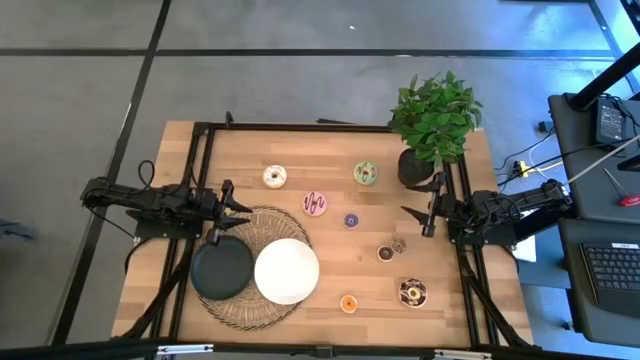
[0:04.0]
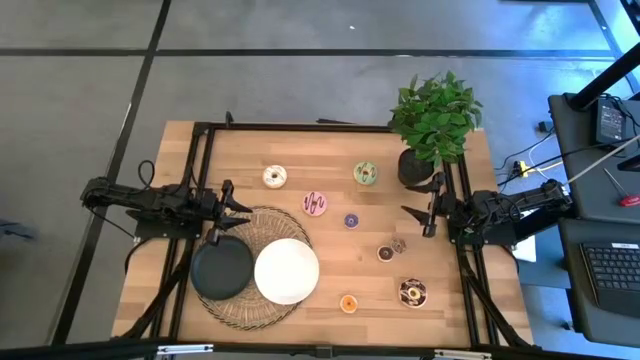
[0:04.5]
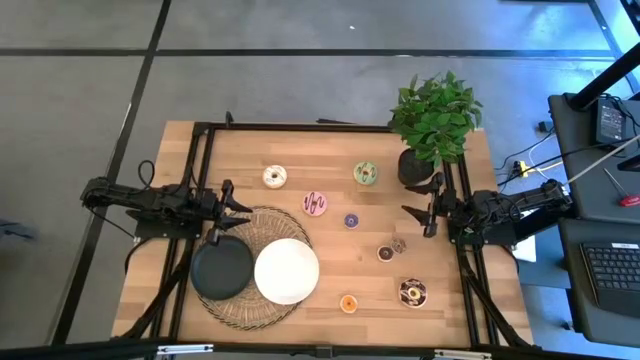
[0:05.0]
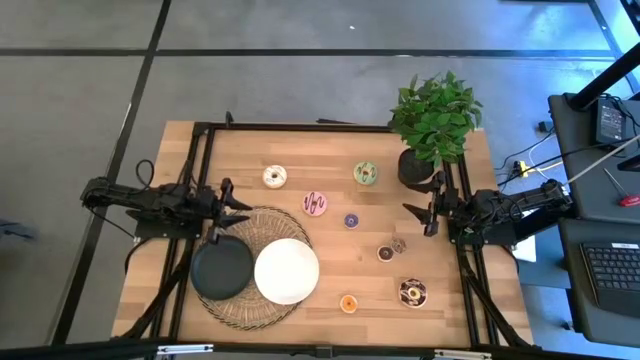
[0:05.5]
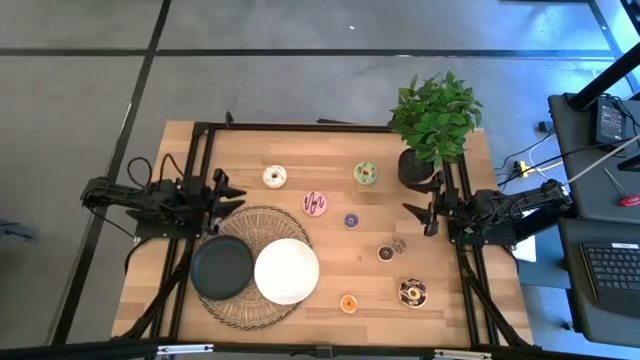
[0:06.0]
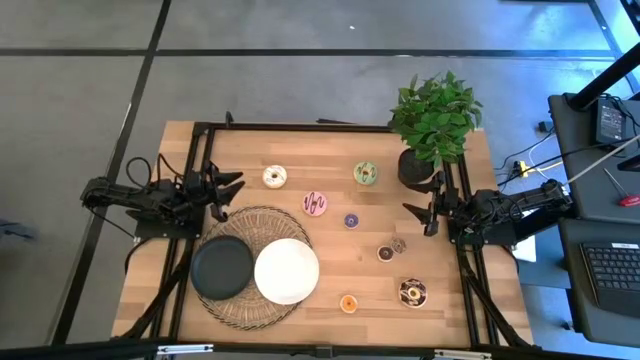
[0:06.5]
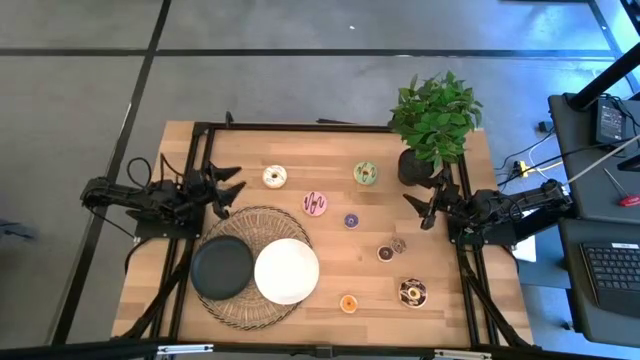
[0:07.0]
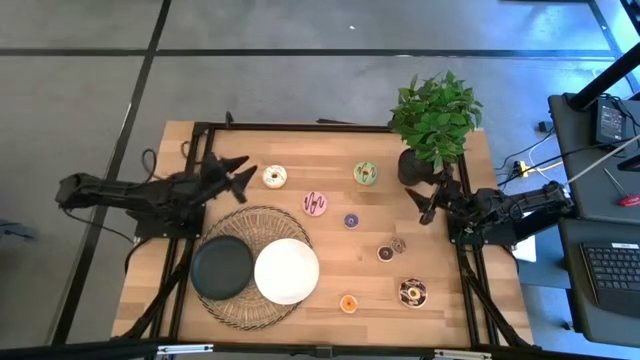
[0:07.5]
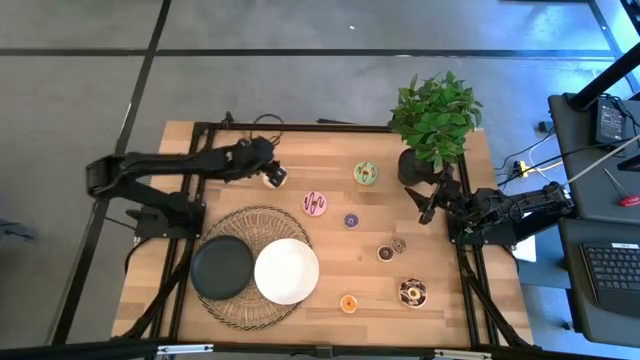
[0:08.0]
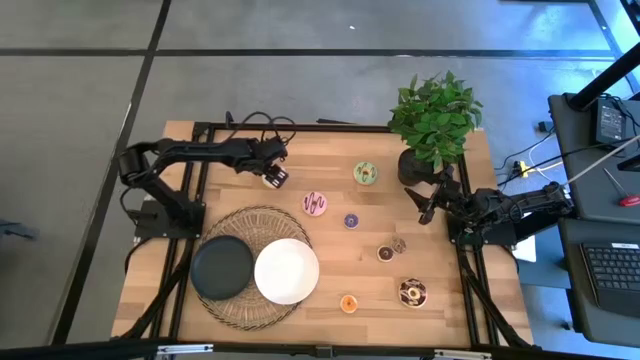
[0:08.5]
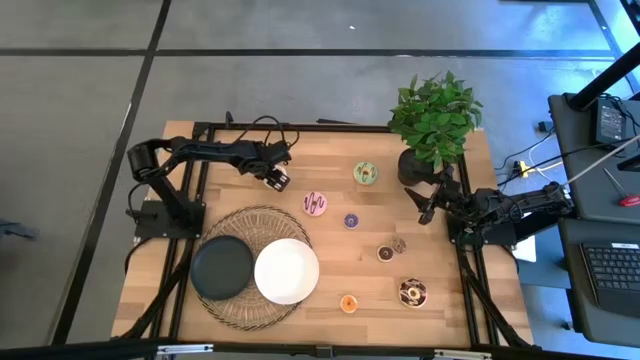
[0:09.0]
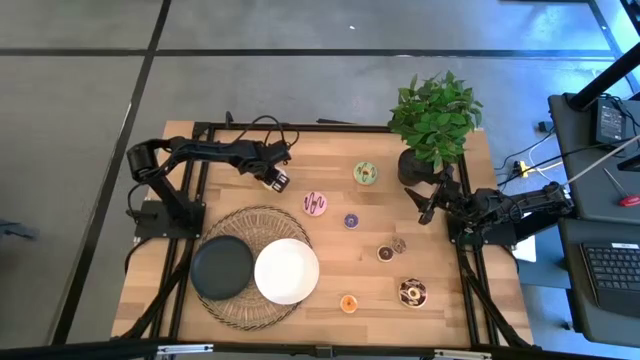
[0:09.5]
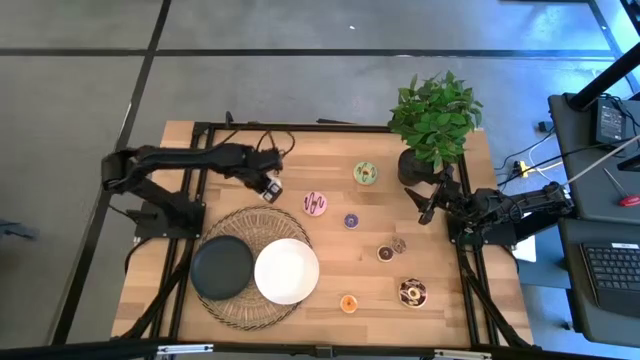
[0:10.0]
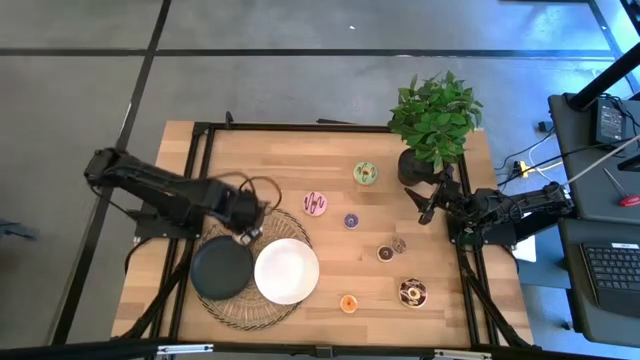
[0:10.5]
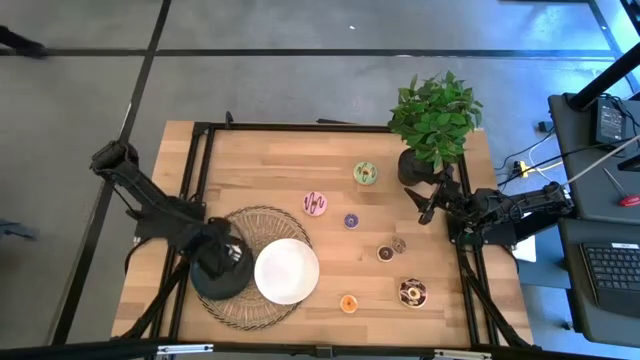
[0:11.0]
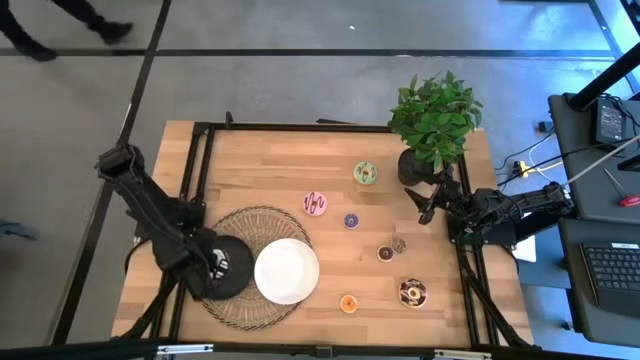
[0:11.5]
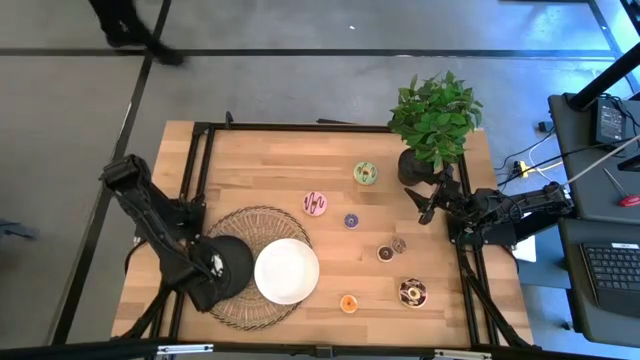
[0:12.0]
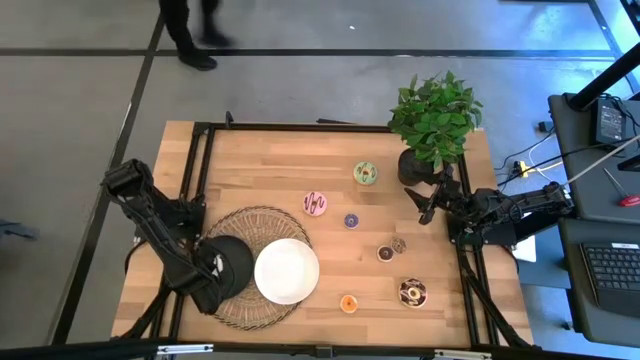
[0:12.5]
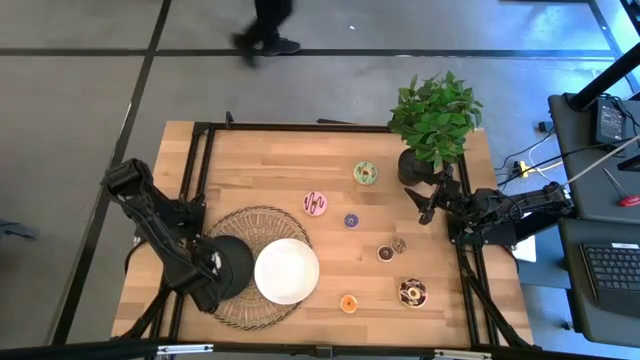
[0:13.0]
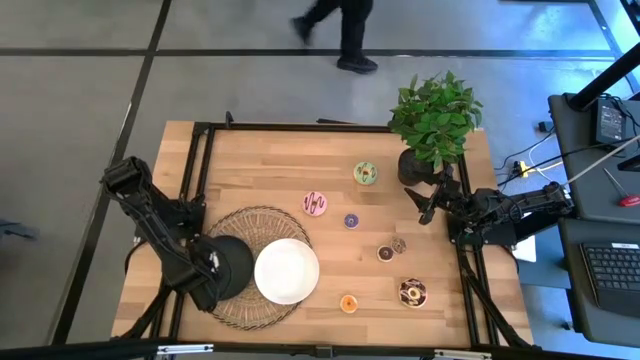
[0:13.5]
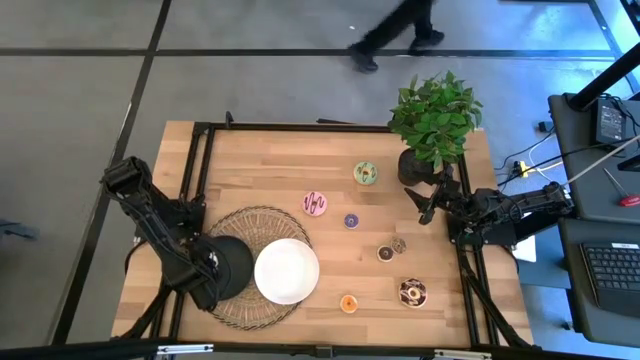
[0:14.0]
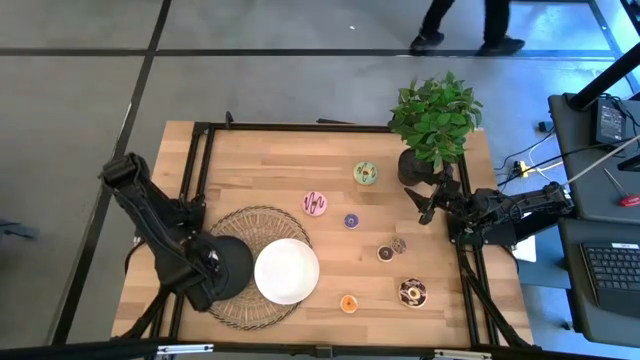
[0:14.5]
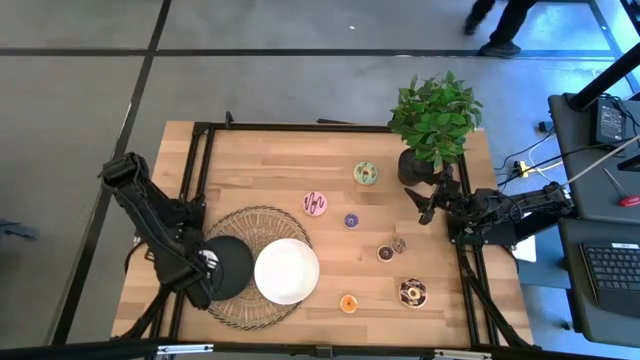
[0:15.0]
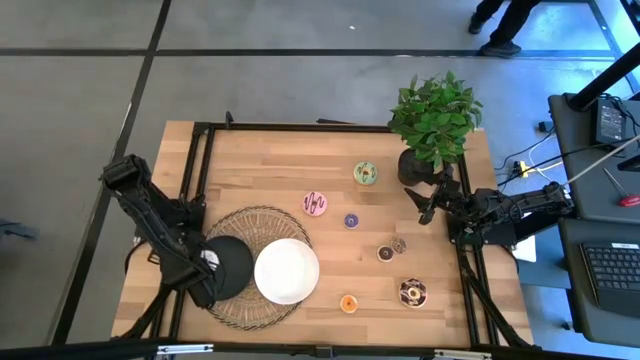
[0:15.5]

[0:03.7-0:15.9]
Task: Pick & Place donuts
Put the large white donut on the black plate

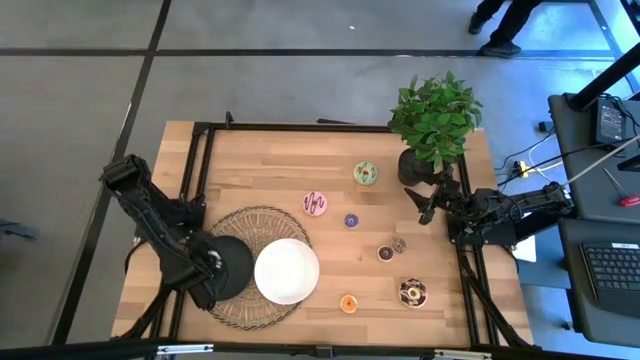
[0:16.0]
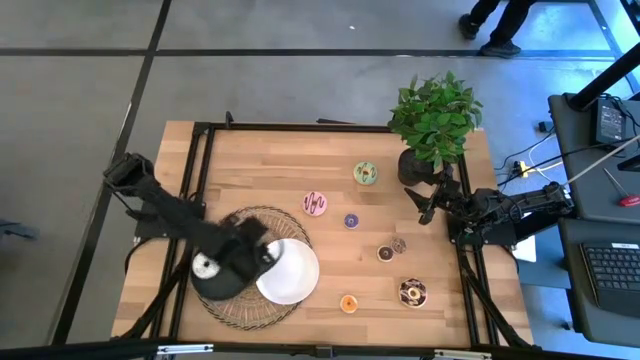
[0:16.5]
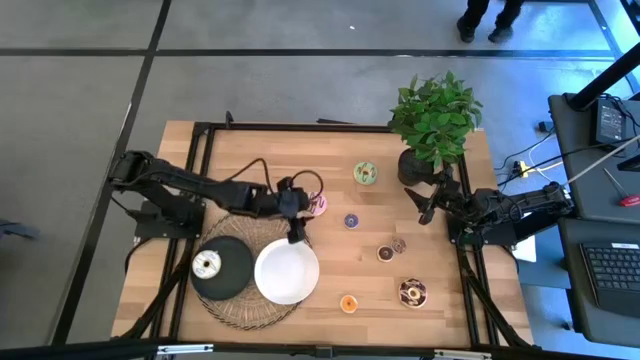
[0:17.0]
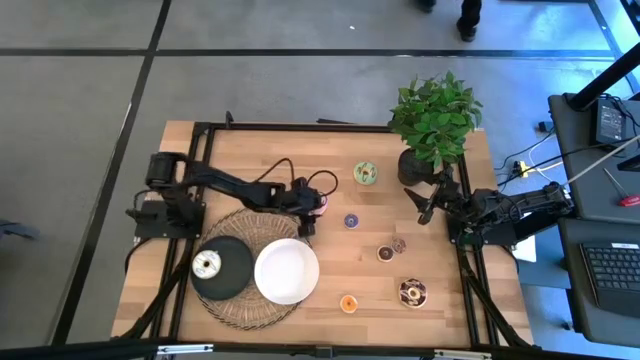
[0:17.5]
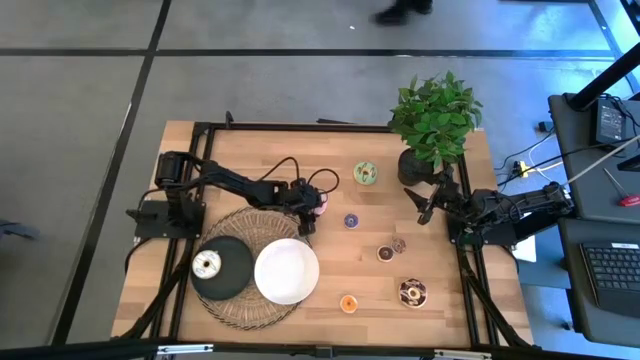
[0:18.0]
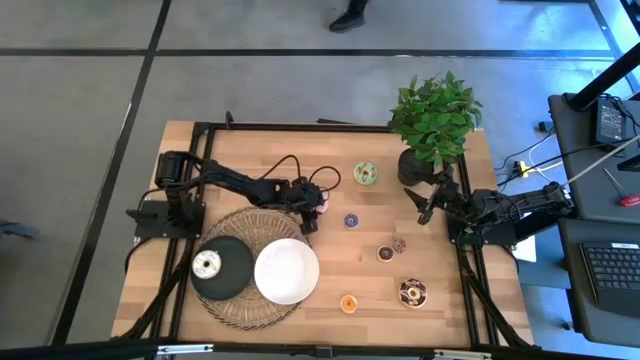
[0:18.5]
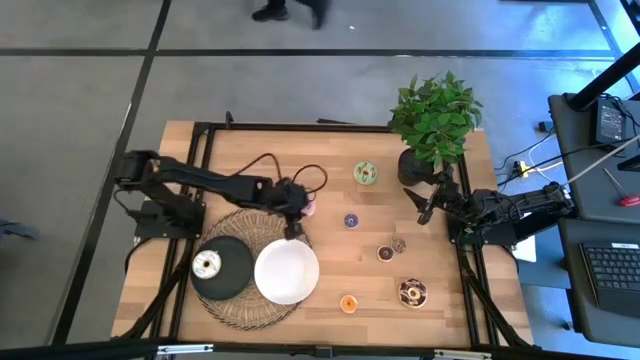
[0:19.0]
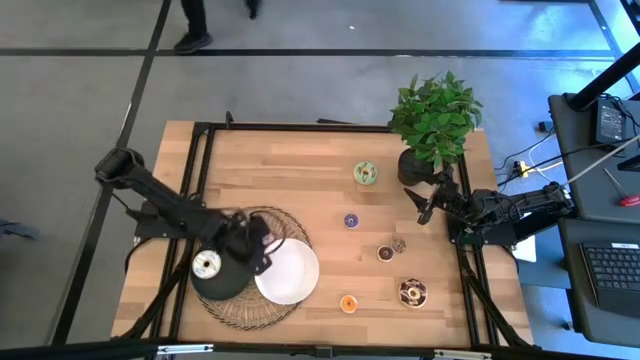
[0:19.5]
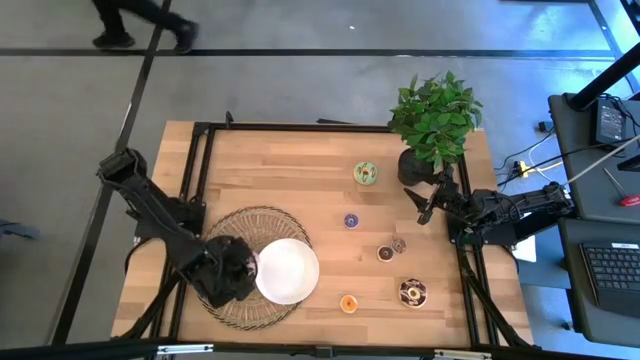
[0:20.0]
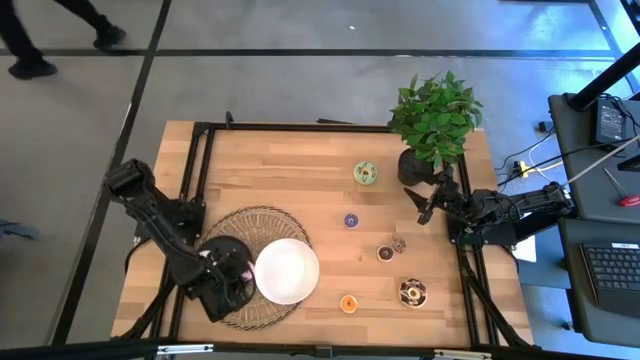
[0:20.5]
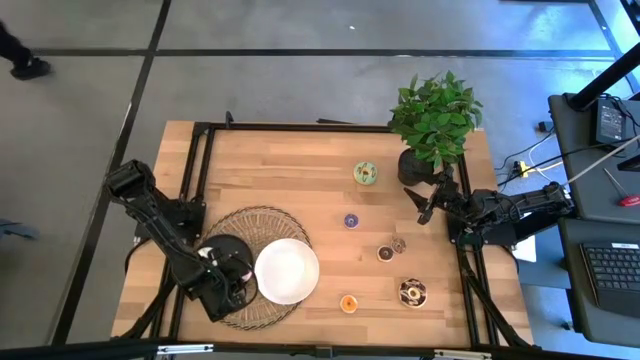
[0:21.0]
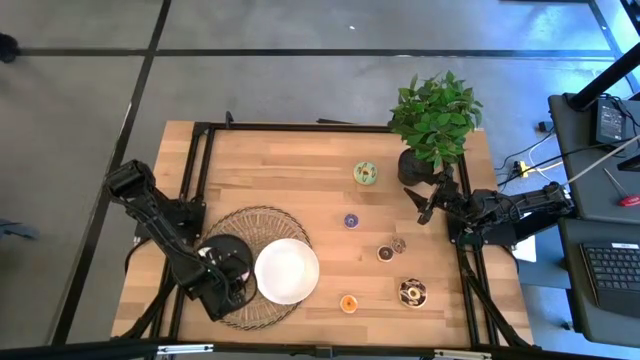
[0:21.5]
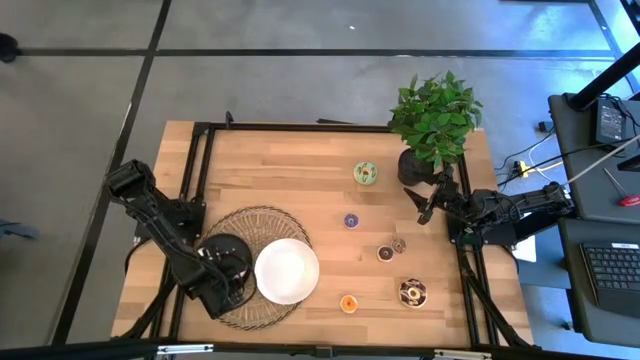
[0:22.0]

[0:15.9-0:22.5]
Put the large pink donut on the black plate

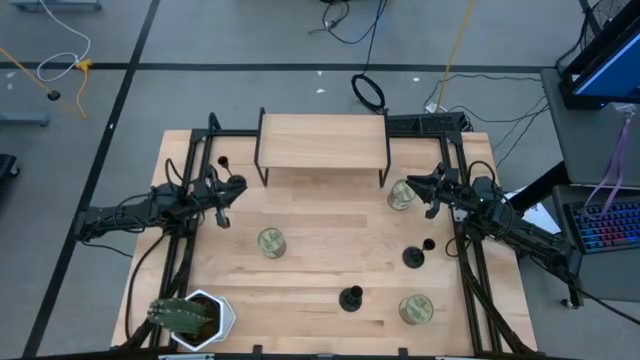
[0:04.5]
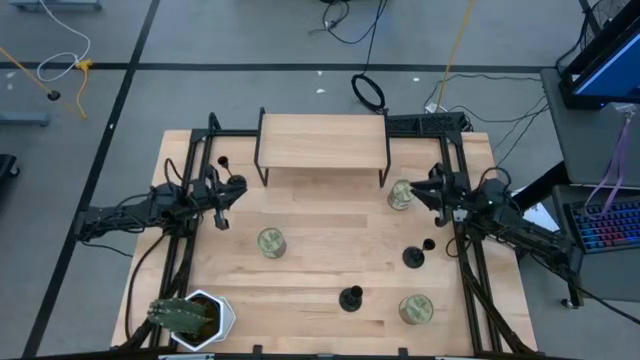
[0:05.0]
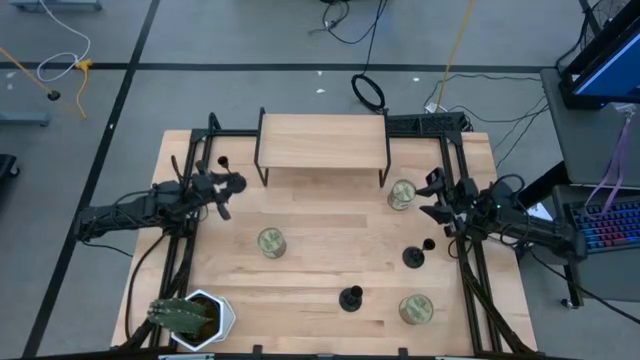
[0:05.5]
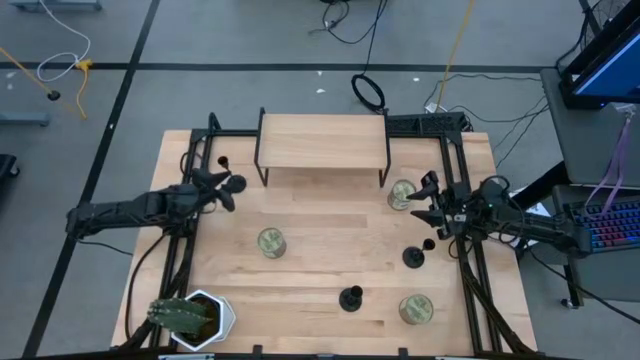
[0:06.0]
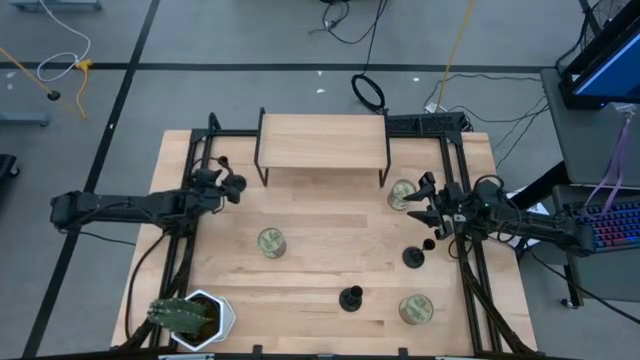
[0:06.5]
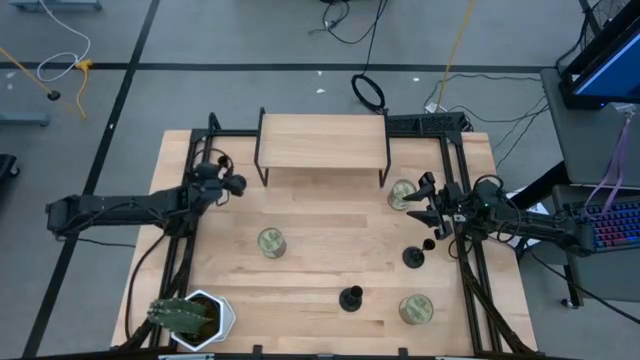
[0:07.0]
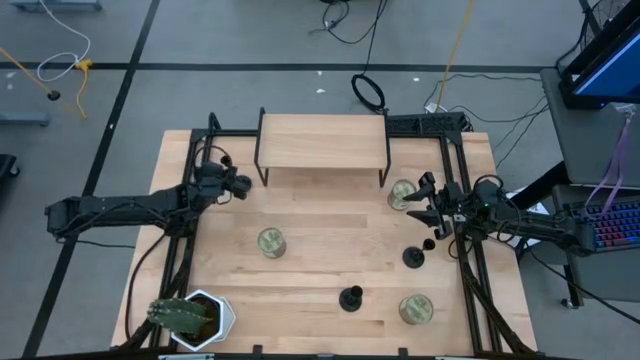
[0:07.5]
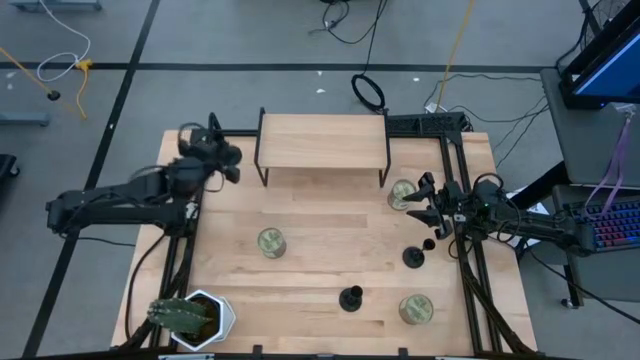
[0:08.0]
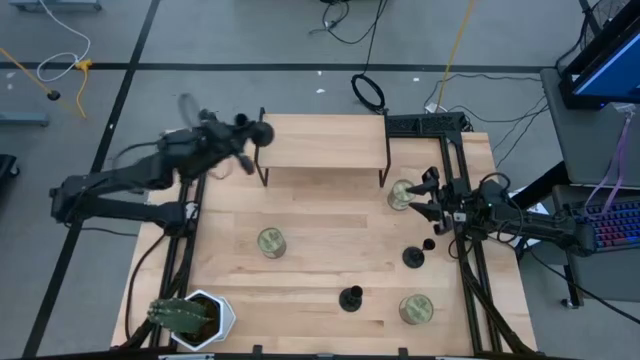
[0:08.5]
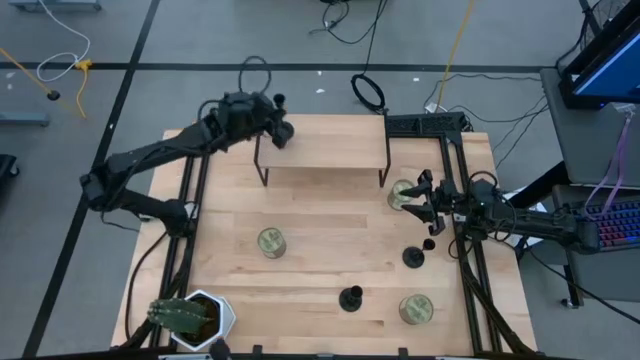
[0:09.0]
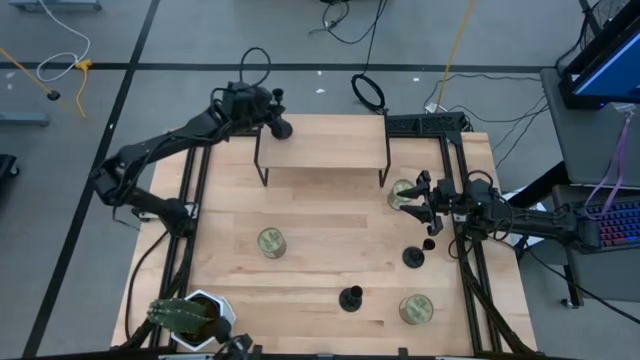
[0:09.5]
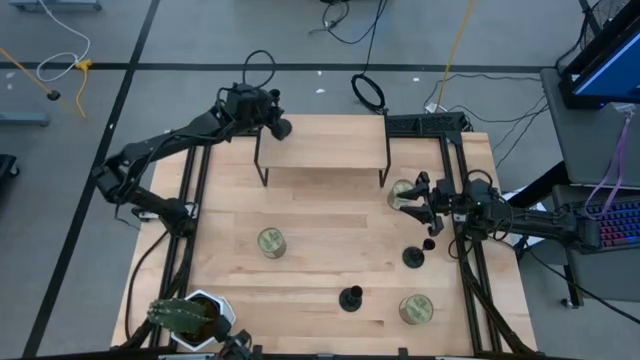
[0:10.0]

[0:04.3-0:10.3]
Task: Pick & Place candle stick holders
Put the top black candle holder on the shelf
